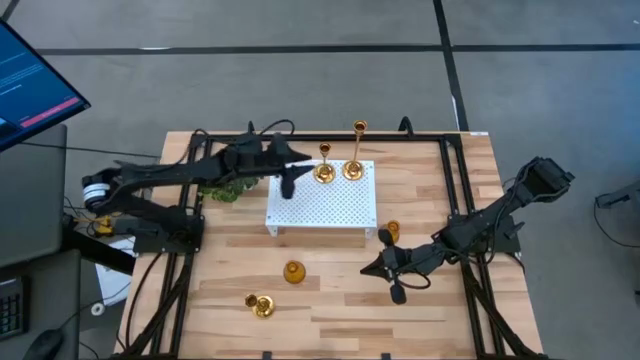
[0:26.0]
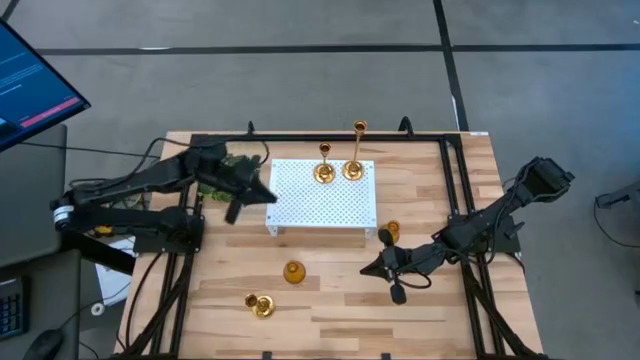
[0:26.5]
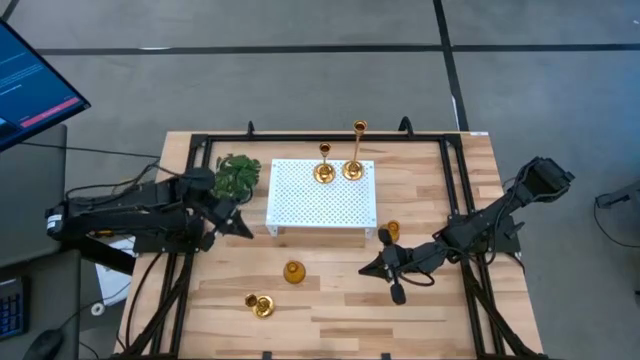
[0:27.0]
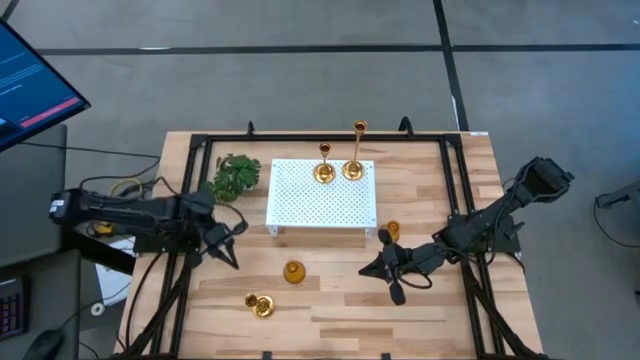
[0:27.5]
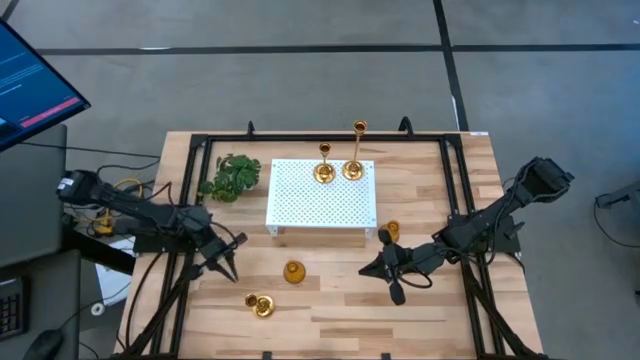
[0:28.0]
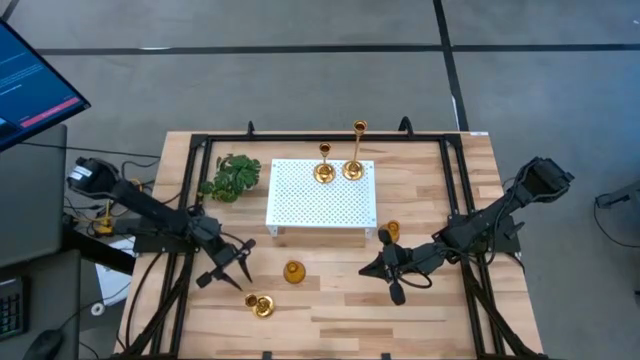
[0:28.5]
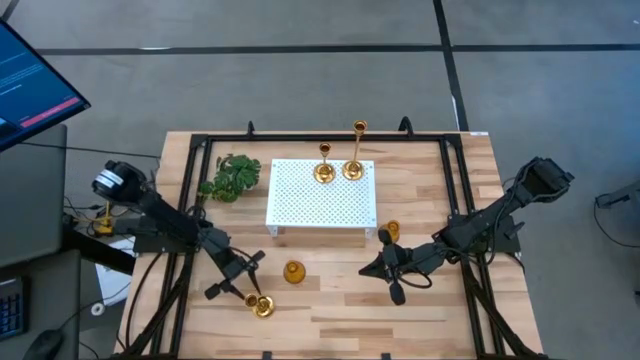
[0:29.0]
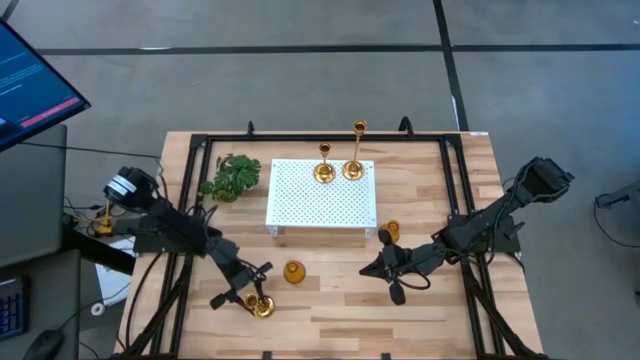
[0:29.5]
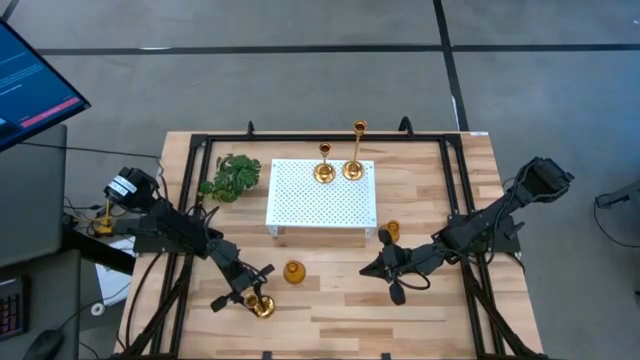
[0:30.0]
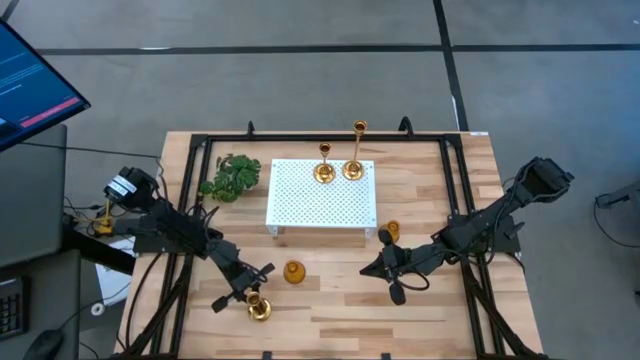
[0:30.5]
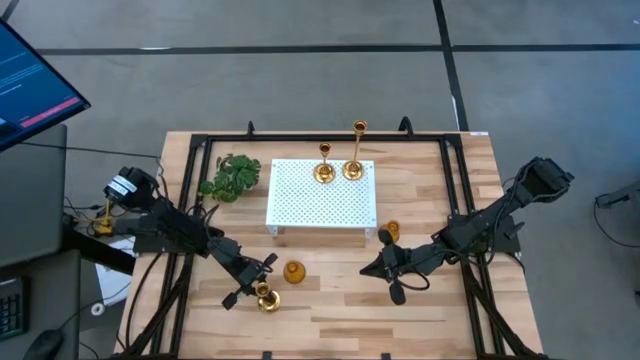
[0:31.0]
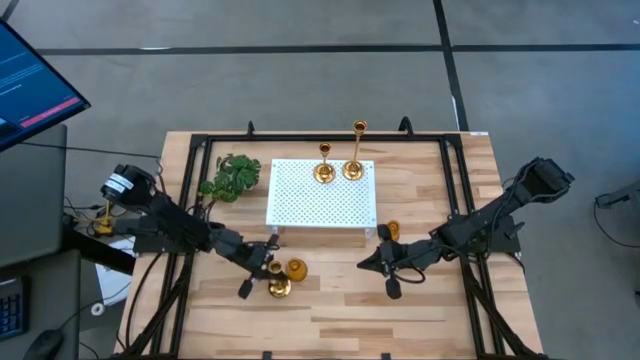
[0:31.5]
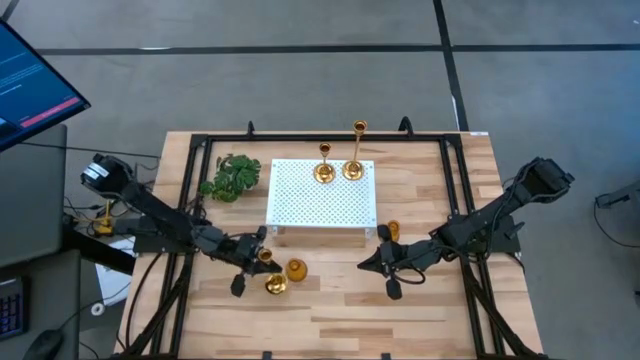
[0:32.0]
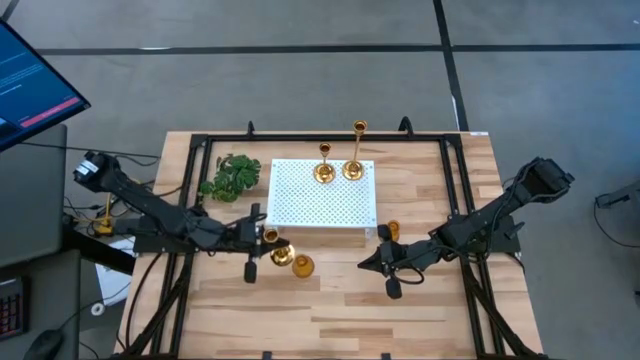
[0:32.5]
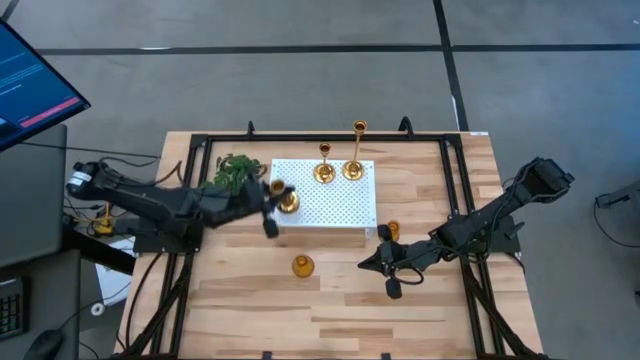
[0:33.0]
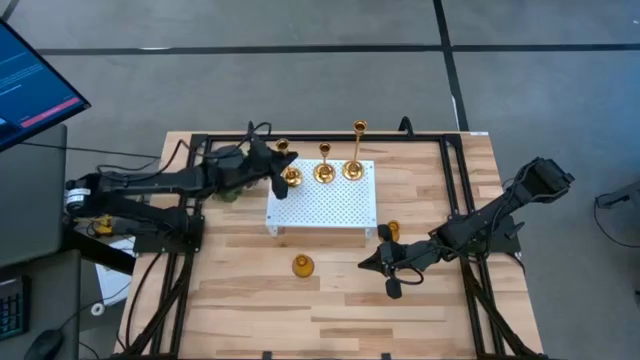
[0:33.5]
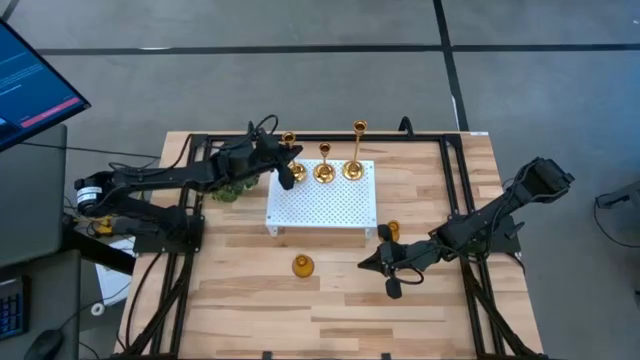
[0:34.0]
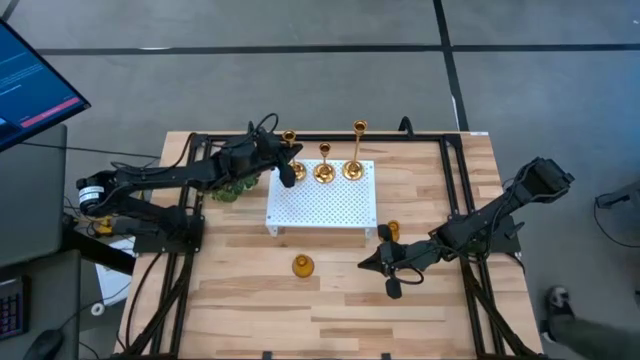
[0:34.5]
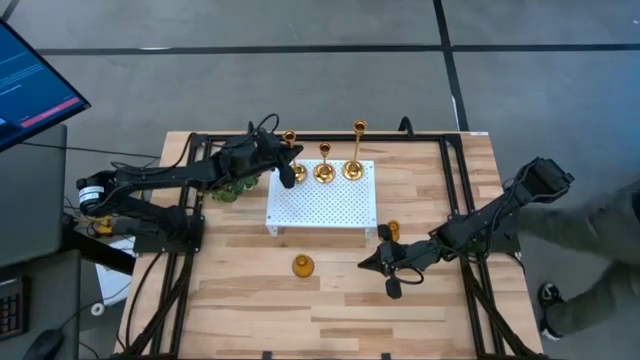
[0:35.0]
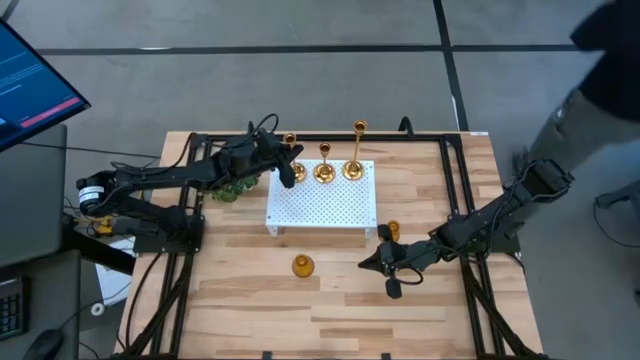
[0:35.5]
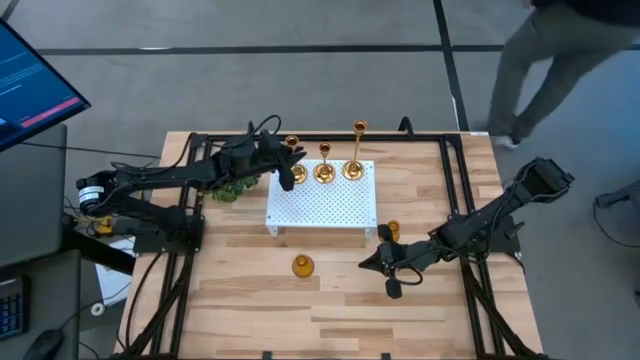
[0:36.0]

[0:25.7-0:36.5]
Task: Pick & Place candle stick holders
Align the gold candle holder on the shelf with the gold candle holders

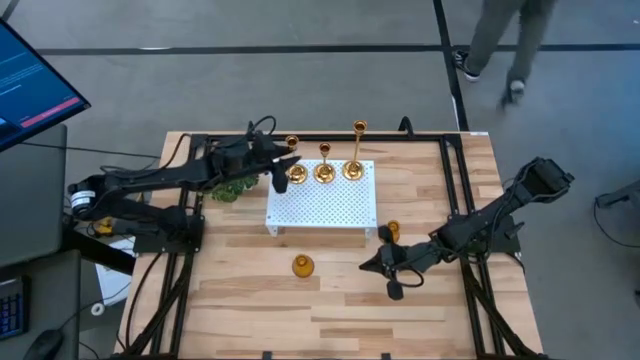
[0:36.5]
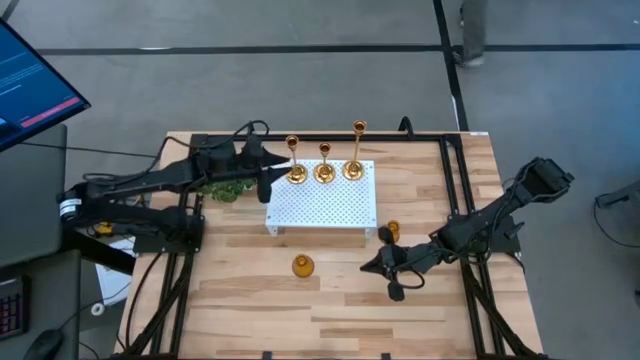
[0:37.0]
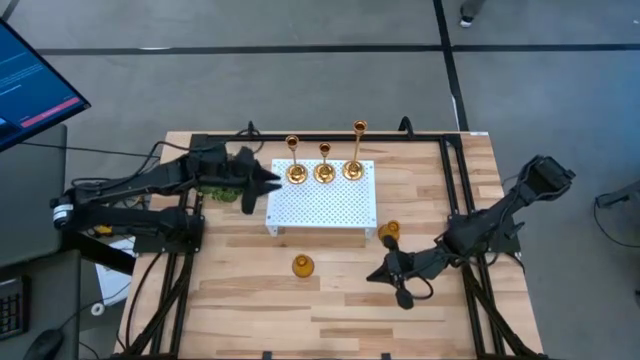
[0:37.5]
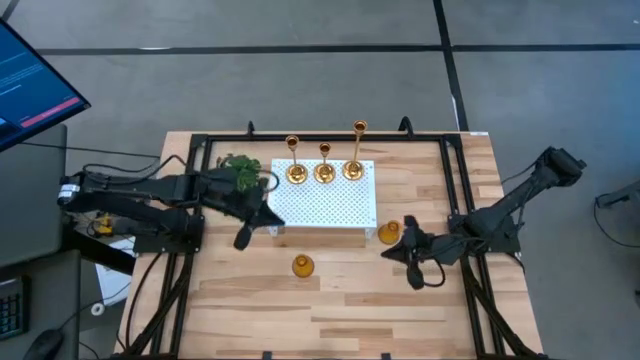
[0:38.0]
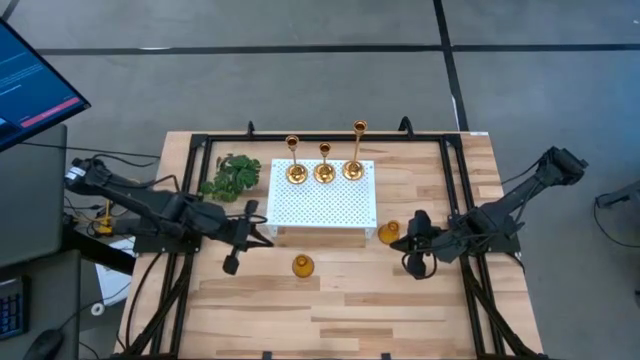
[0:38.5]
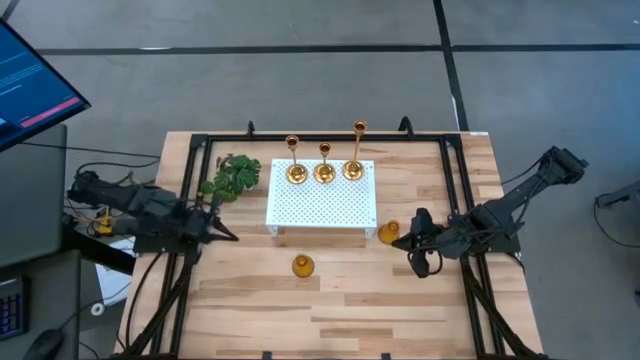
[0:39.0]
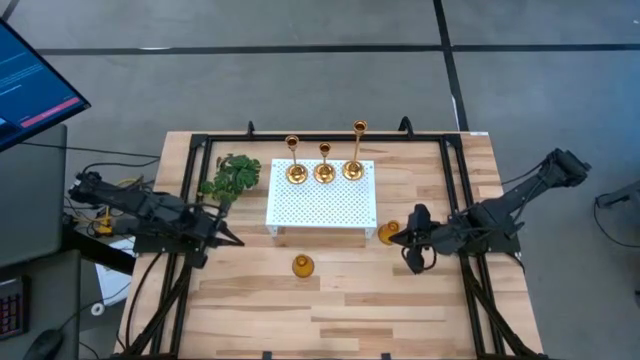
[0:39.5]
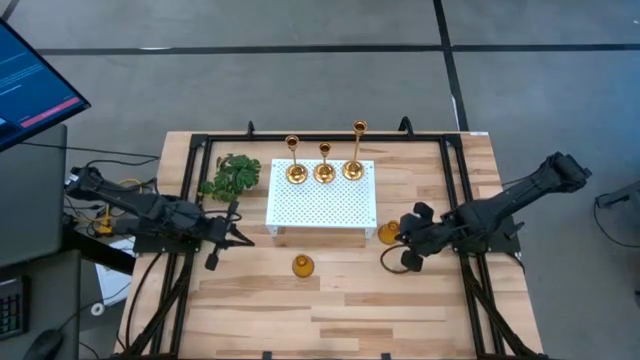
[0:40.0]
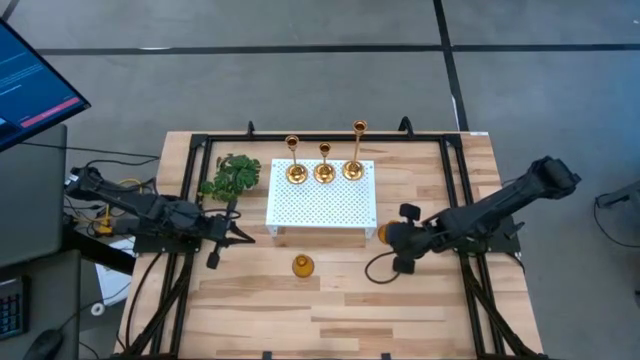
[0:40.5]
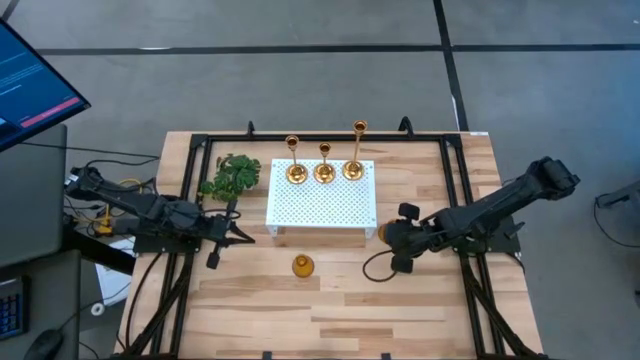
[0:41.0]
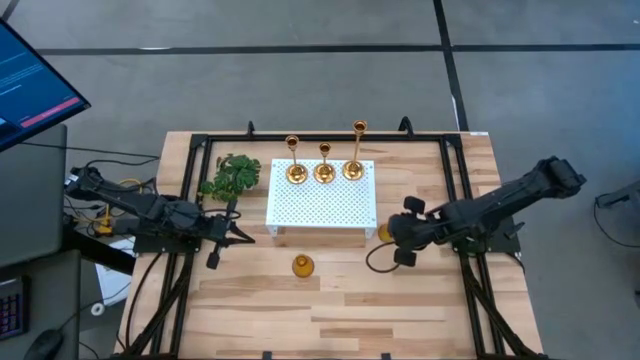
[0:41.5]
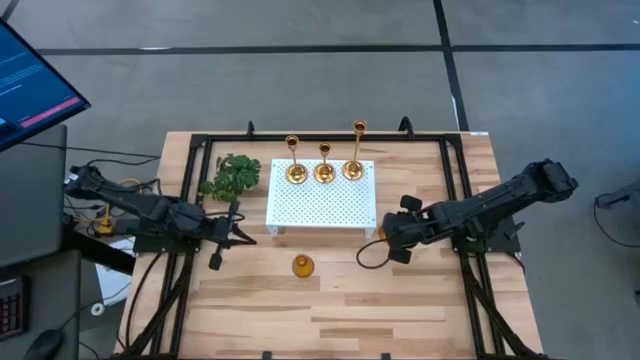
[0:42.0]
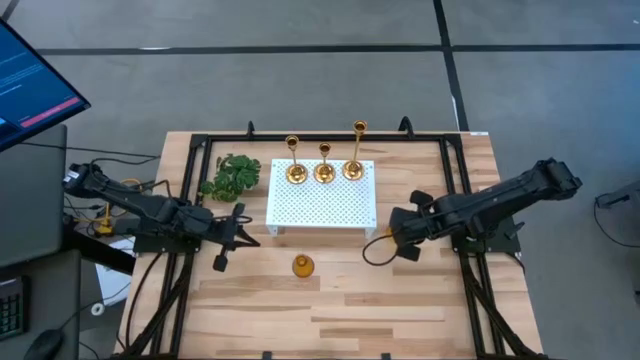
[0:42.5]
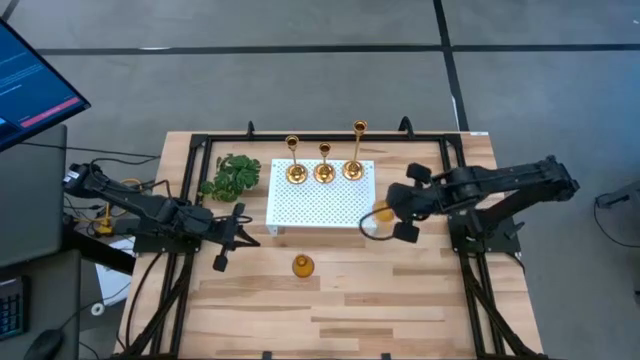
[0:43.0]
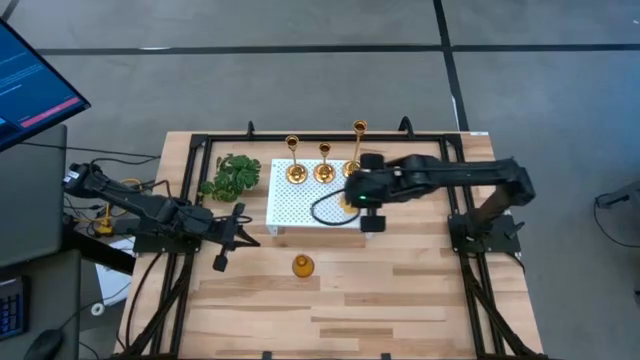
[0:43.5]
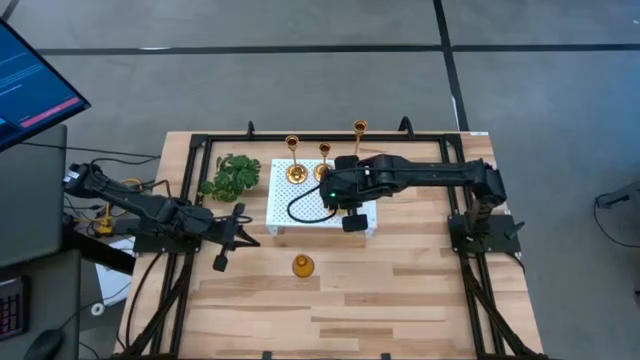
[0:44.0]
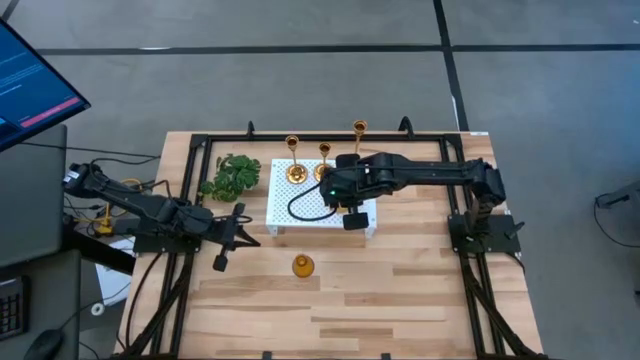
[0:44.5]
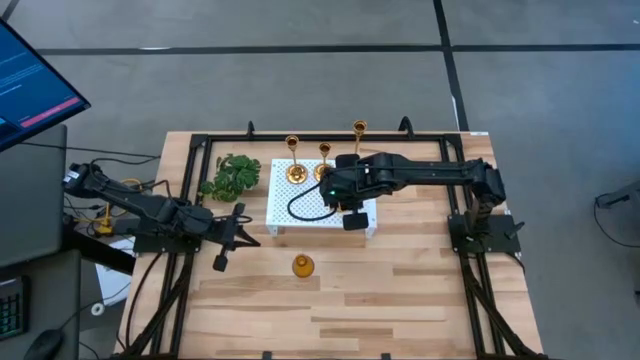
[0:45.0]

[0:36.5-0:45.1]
Put the top yellow candle holder on the shelf

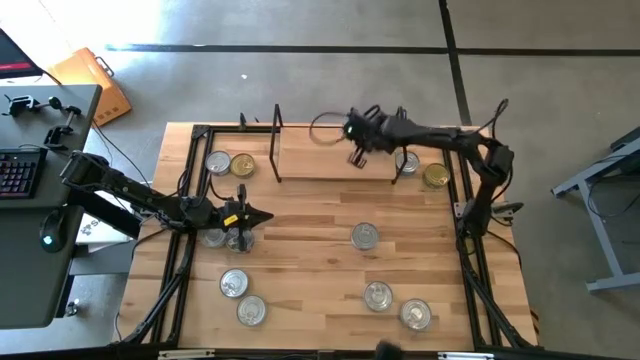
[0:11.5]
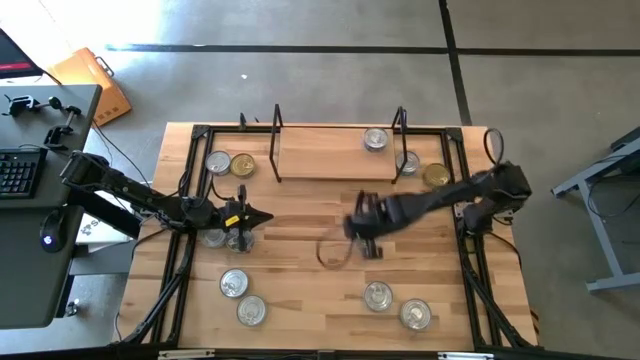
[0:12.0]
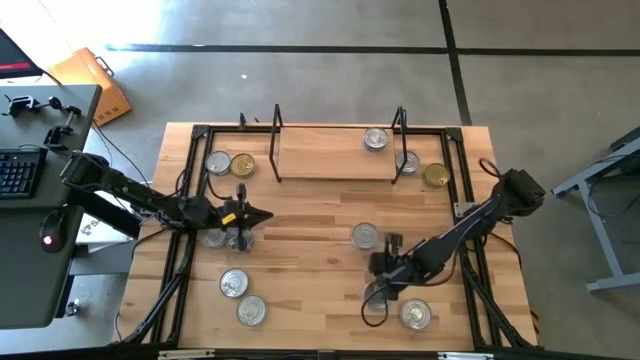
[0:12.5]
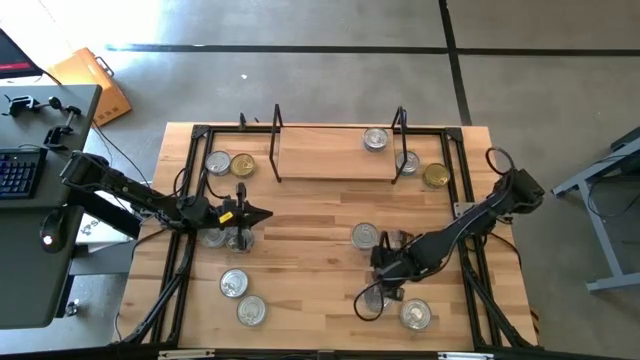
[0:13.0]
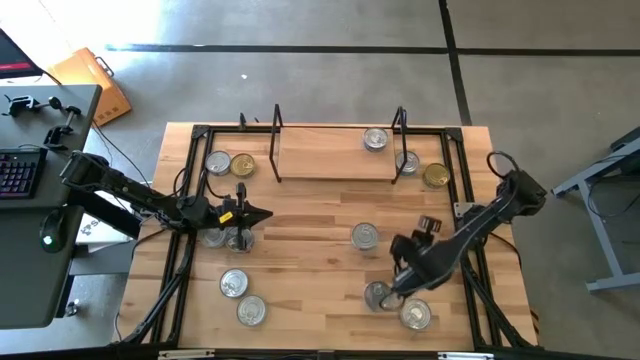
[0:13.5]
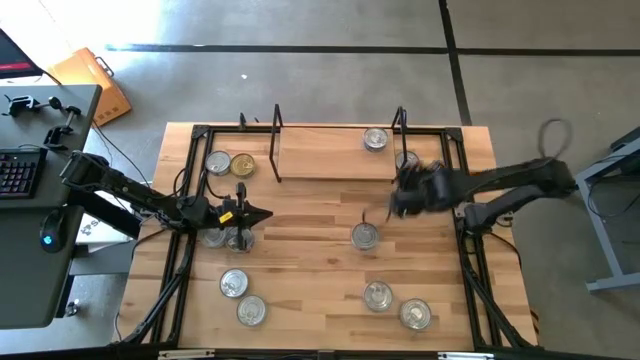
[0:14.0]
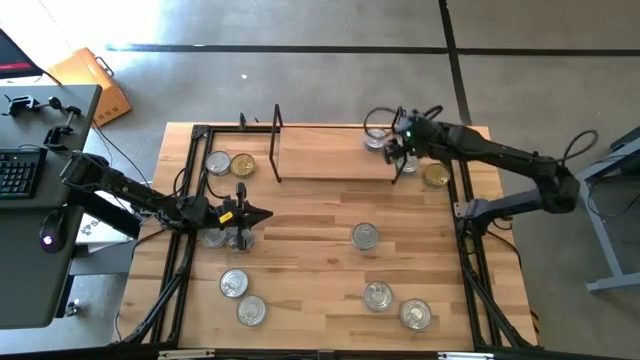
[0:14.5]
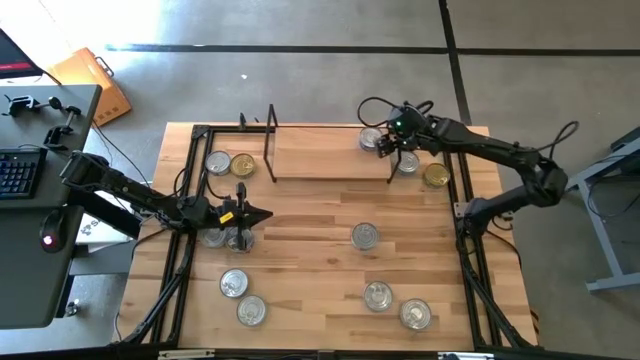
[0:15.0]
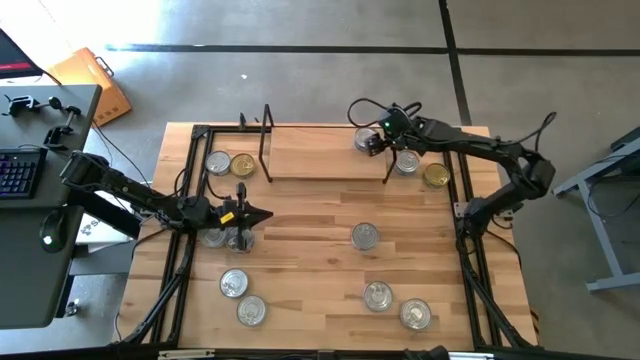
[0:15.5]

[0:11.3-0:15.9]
Task: Stack canned seafood by type on shelf
Adjust the shelf
